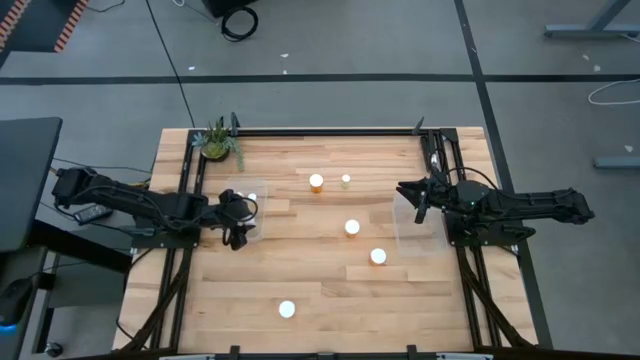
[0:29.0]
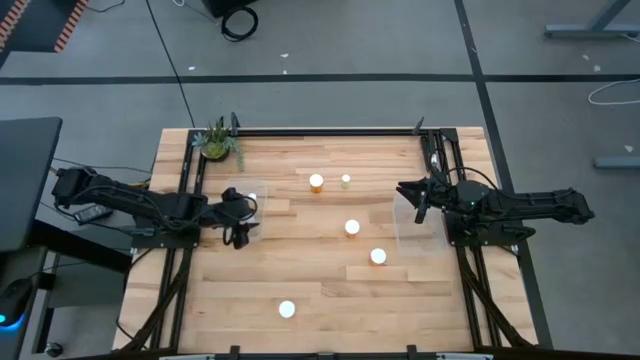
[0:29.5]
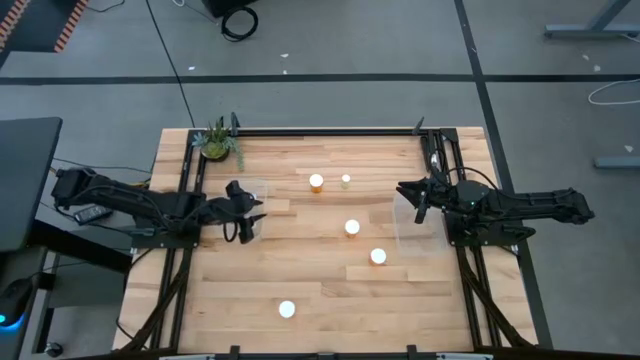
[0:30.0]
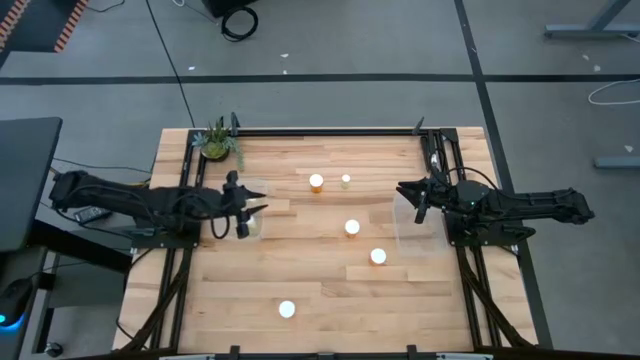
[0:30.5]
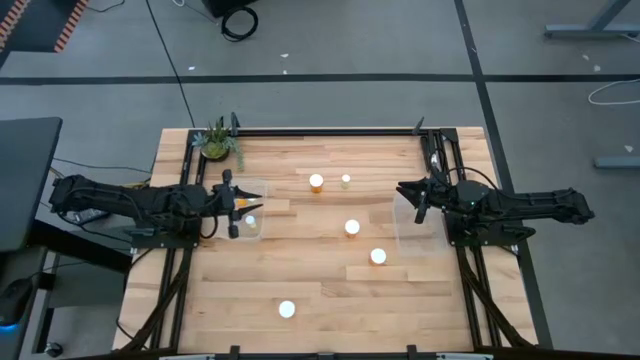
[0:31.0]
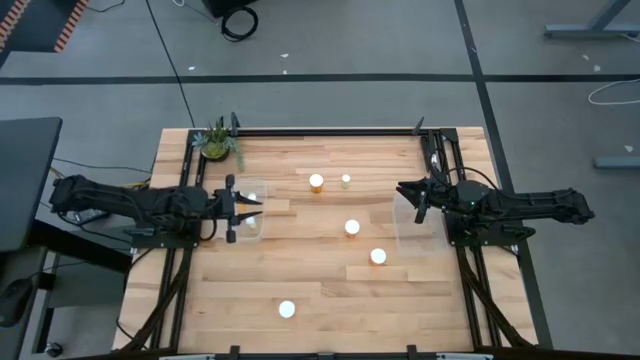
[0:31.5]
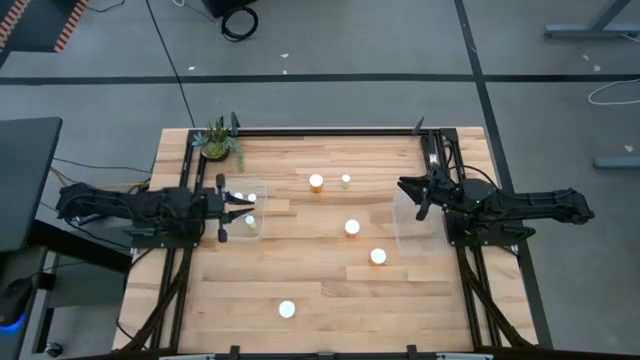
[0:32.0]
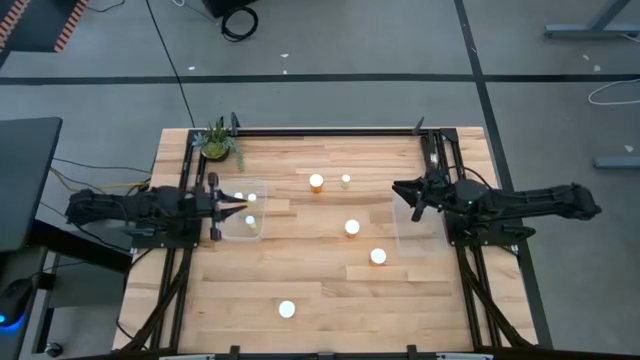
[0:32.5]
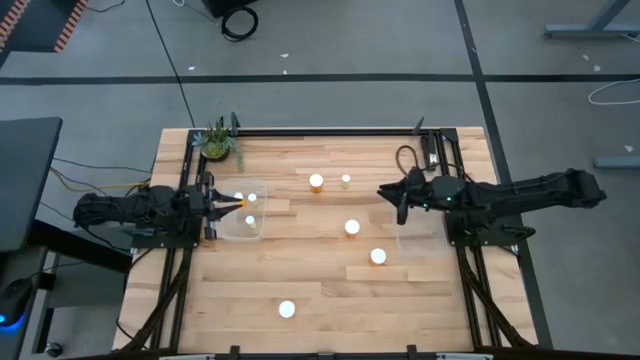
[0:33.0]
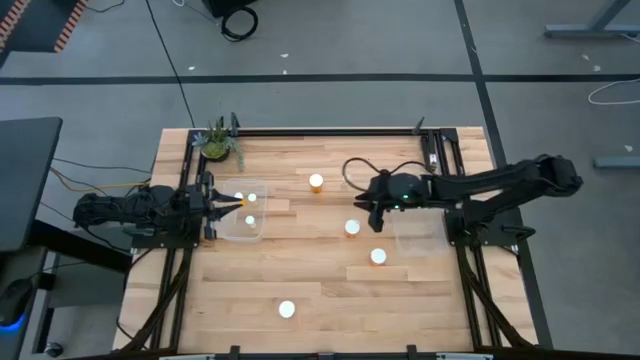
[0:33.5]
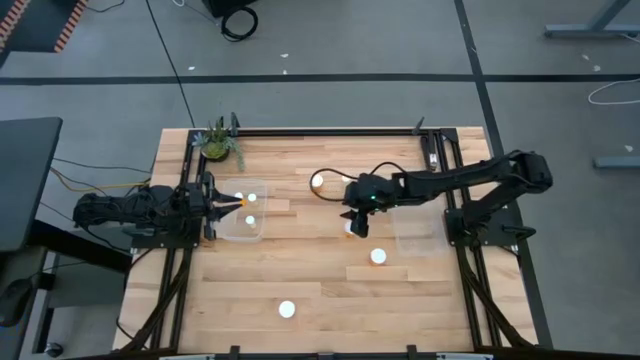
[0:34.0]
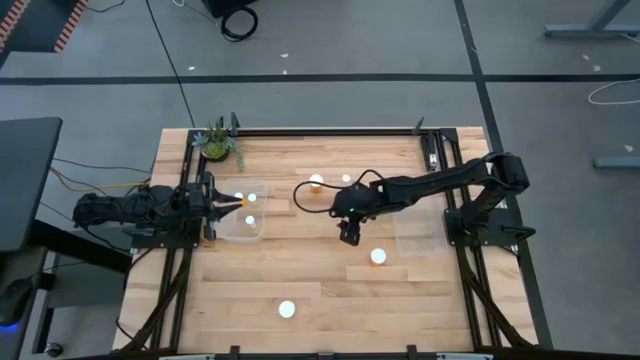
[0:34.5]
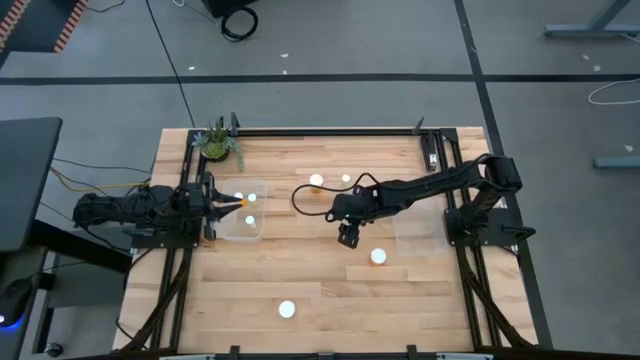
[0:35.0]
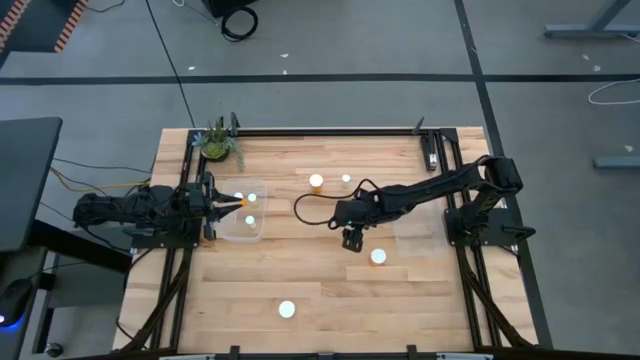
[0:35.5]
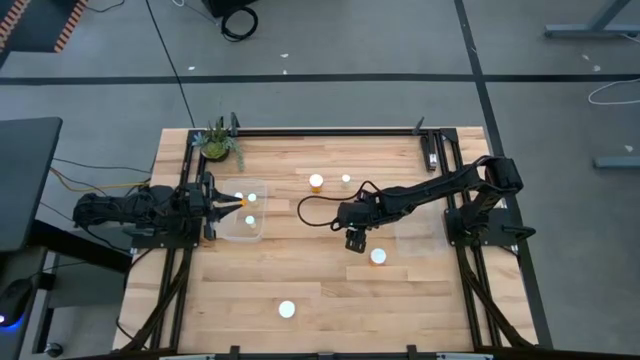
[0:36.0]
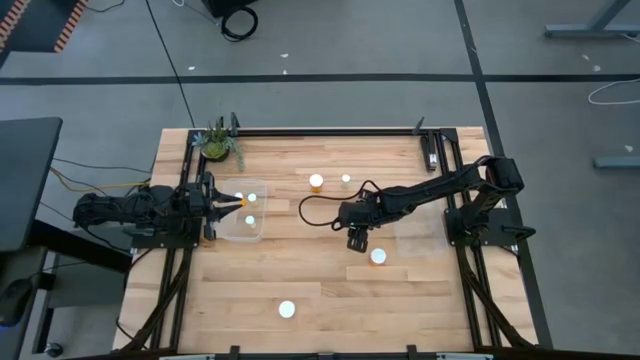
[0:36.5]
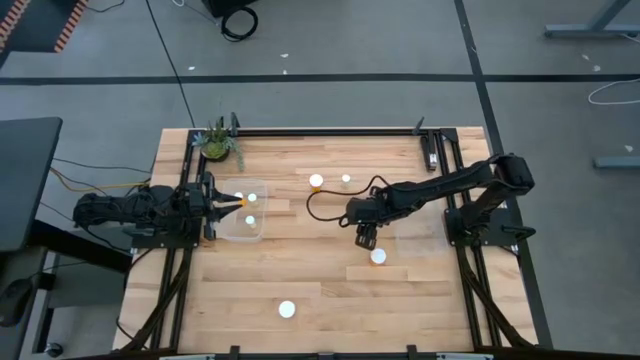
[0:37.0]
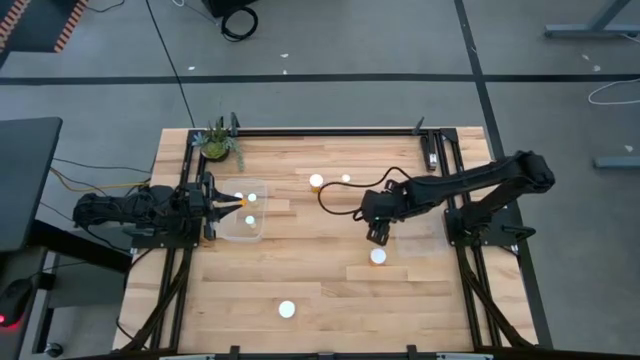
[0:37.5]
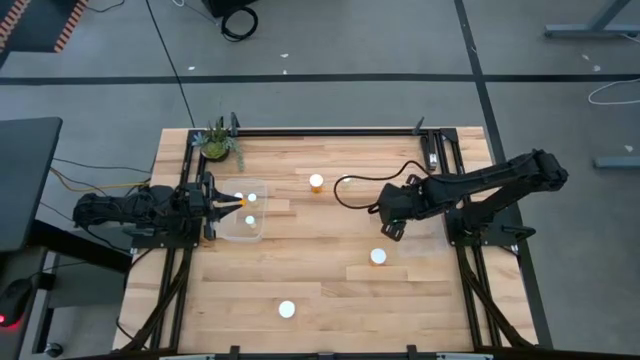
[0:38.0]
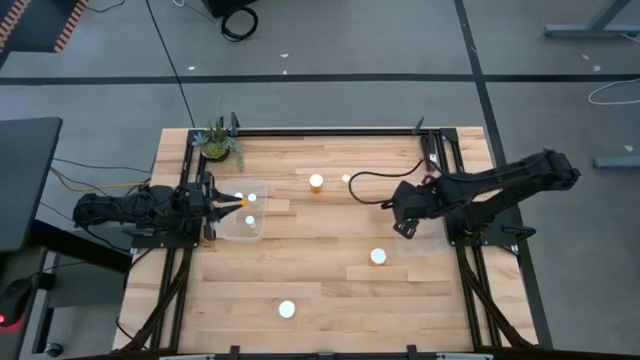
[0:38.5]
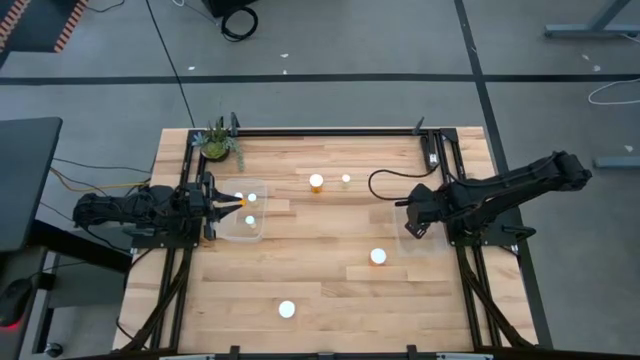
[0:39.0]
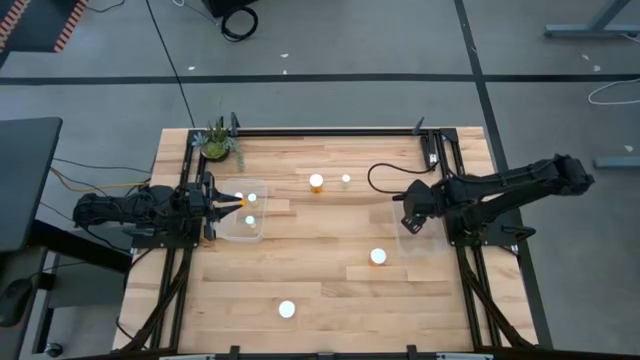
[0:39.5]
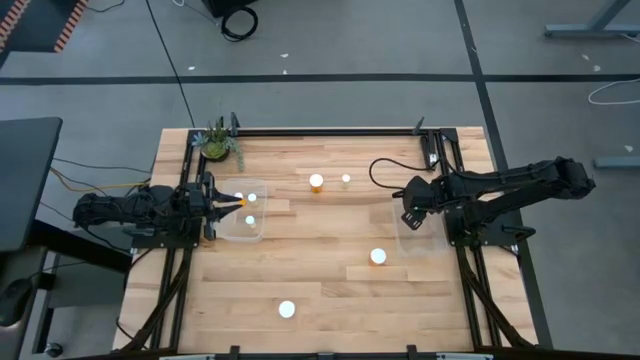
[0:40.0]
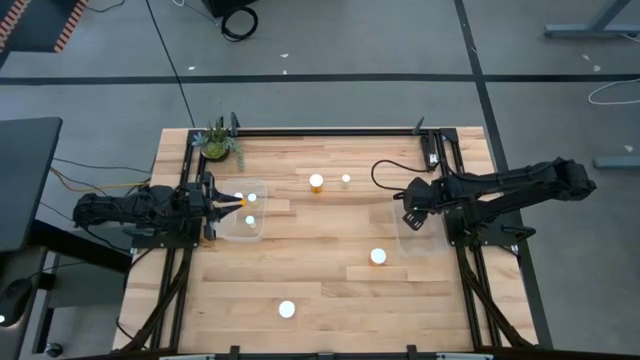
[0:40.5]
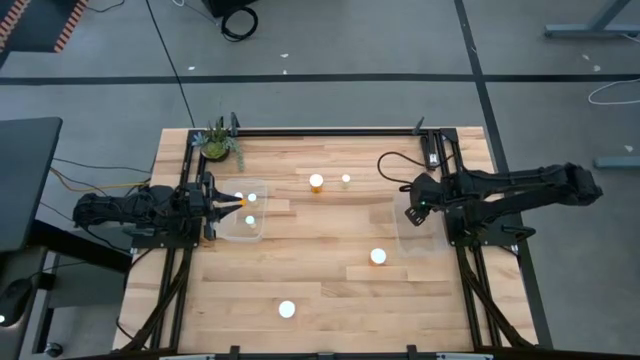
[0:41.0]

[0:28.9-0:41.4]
Task: Pick and place medicine bottles into bin by pill shape (circle, oval)
Put the large orange pill bottle into the right transparent bin

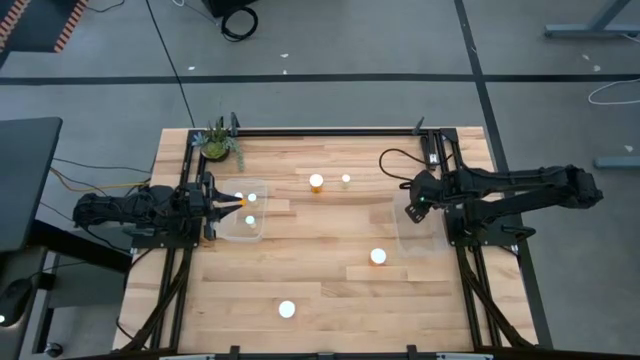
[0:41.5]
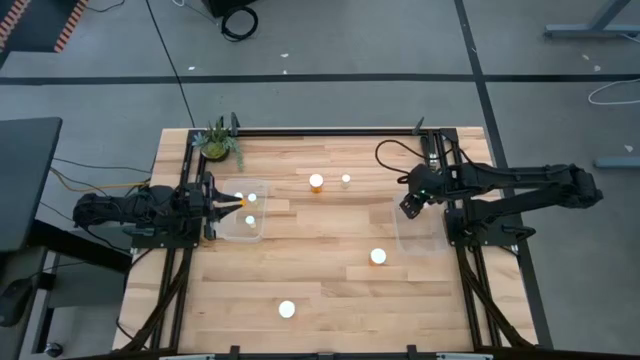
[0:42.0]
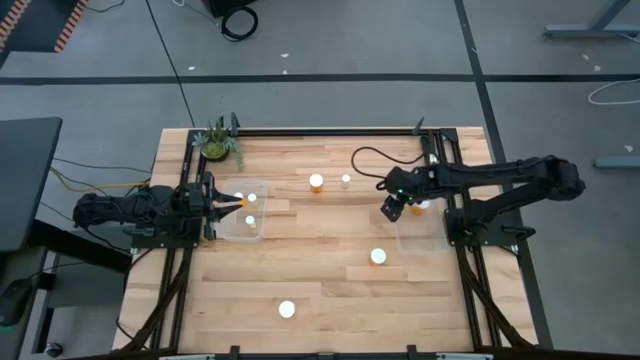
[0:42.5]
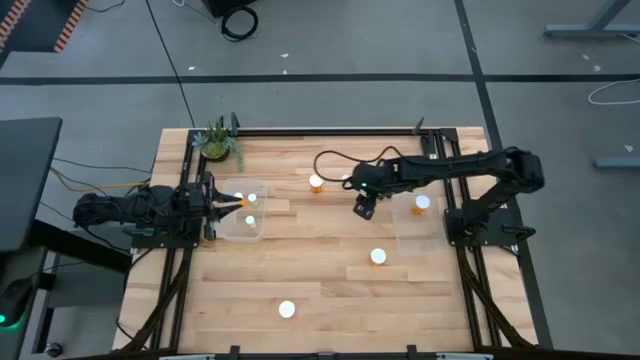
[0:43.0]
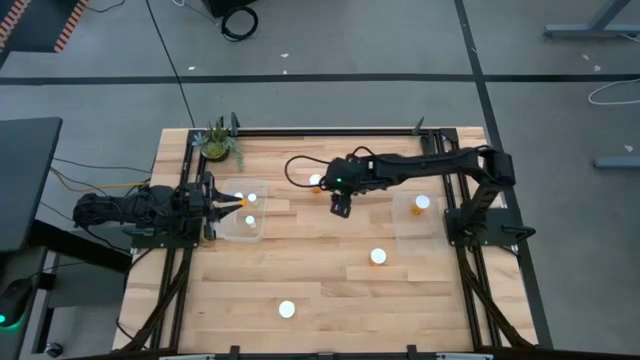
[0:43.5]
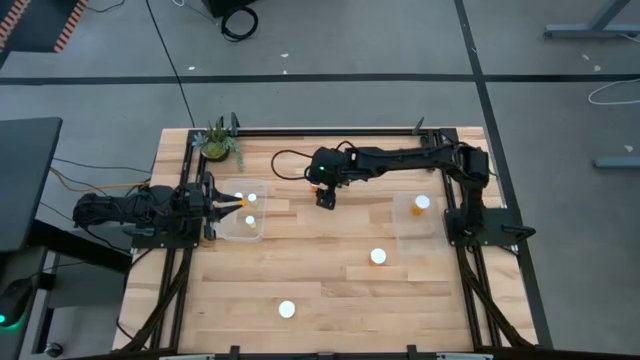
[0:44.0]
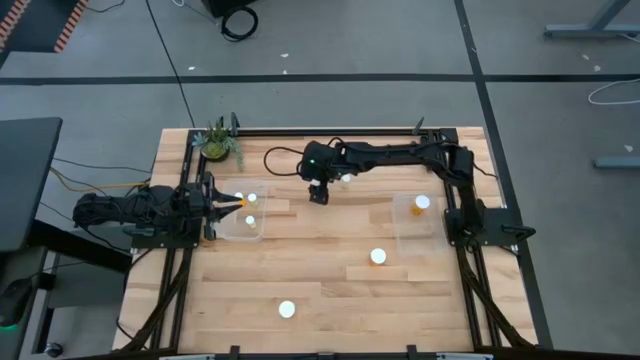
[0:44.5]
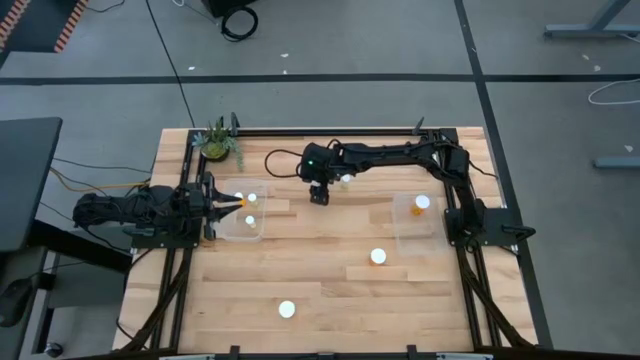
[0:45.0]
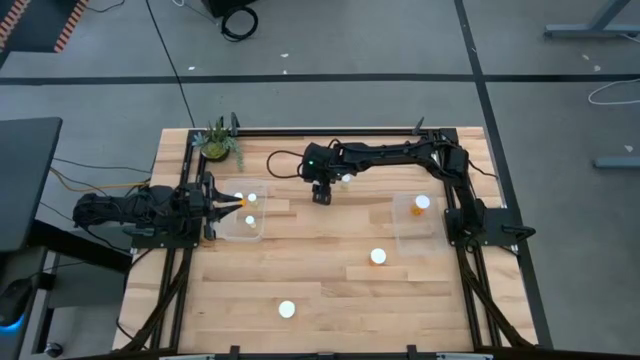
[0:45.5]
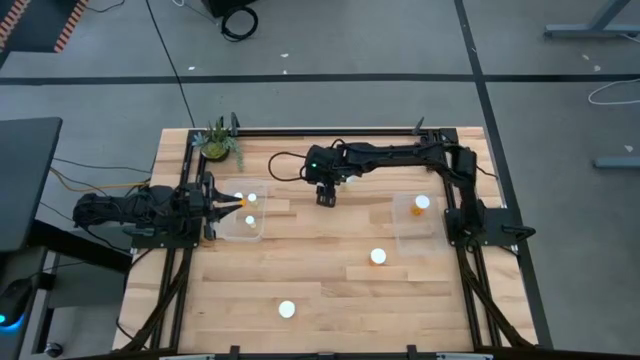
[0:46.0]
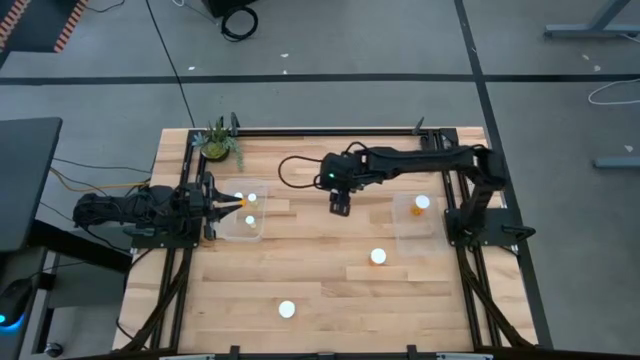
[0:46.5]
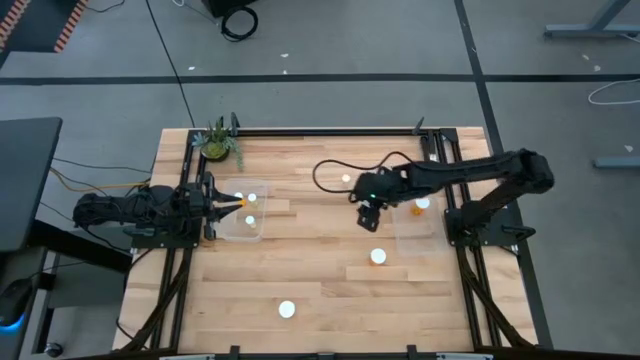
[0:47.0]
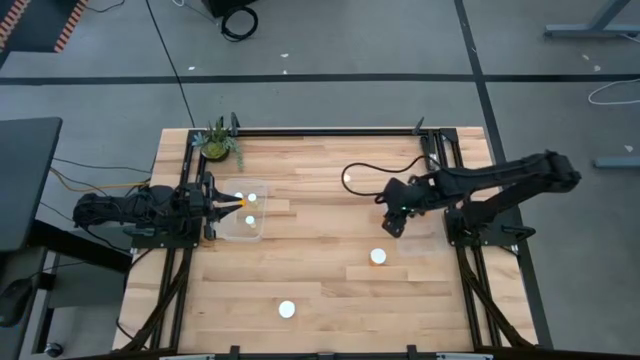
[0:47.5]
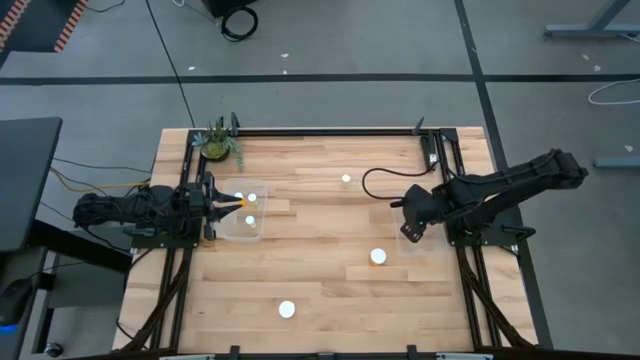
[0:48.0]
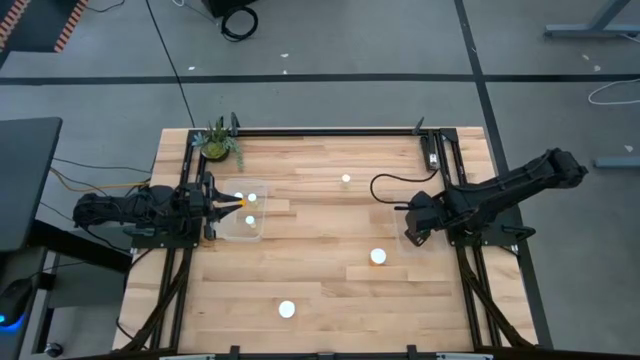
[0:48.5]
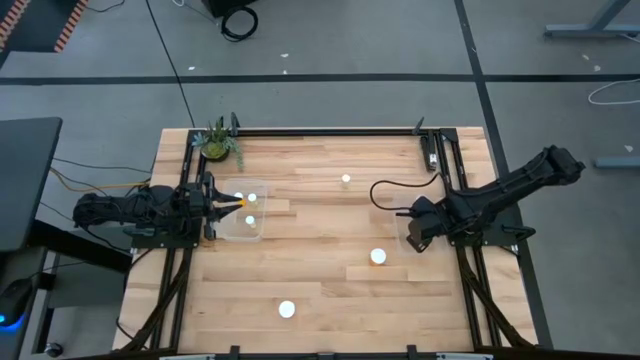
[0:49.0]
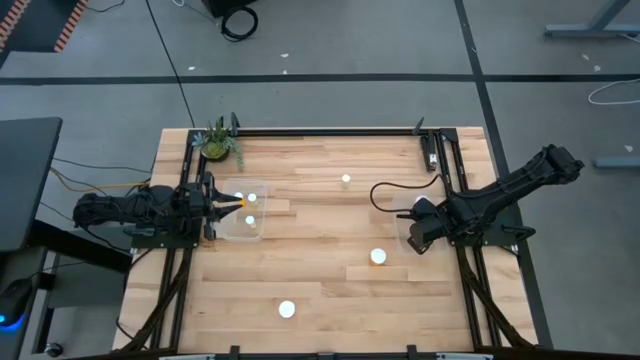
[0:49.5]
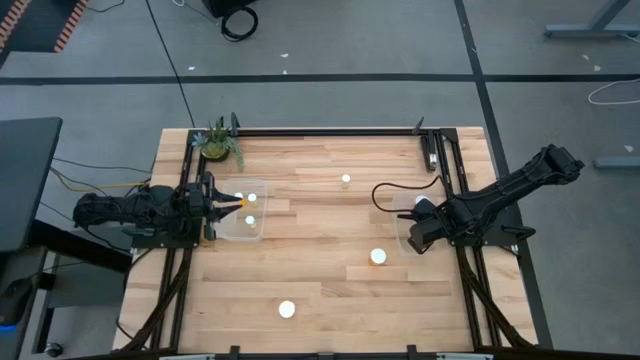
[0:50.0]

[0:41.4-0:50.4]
Put the large orange pill bottle into the right transparent bin
